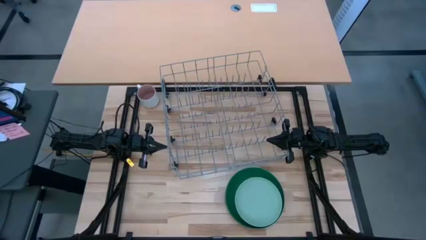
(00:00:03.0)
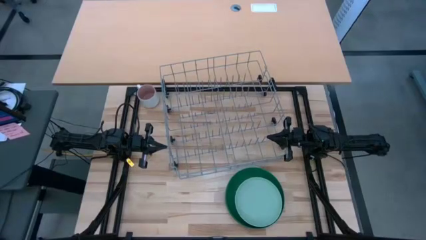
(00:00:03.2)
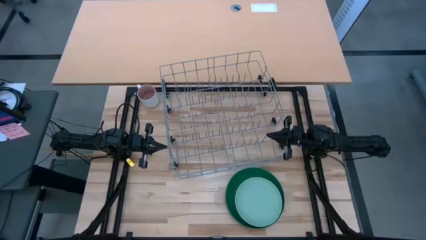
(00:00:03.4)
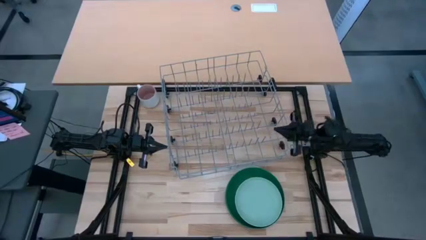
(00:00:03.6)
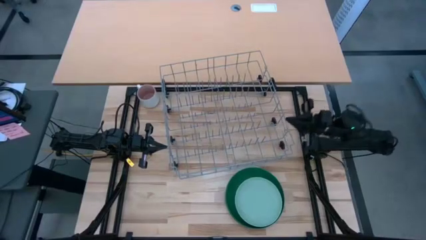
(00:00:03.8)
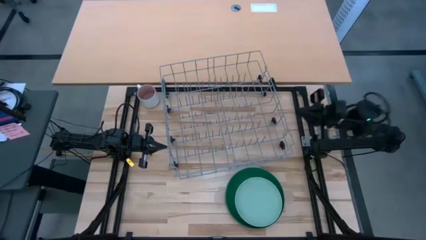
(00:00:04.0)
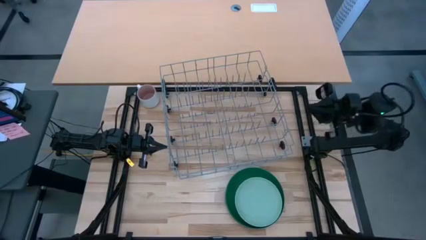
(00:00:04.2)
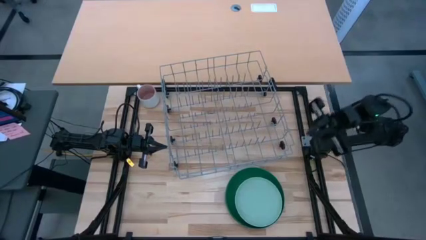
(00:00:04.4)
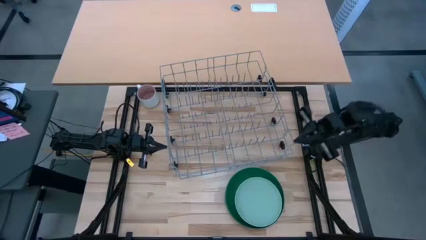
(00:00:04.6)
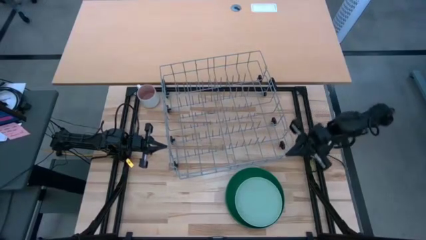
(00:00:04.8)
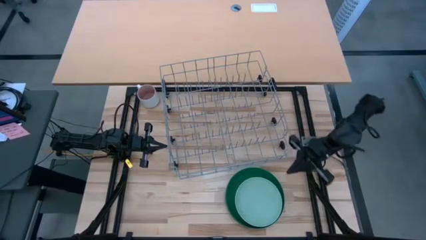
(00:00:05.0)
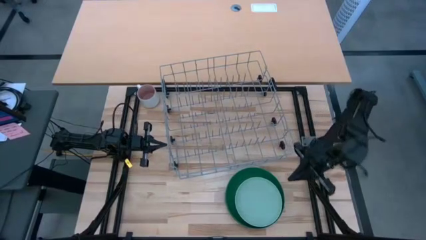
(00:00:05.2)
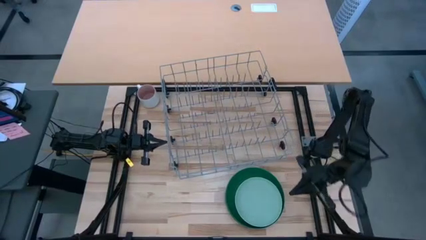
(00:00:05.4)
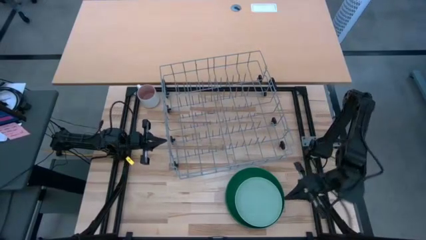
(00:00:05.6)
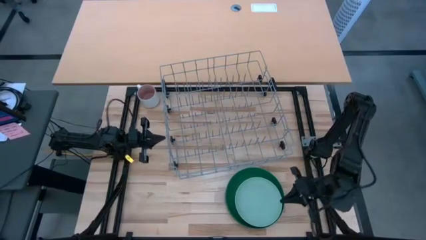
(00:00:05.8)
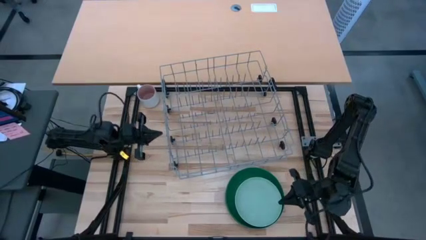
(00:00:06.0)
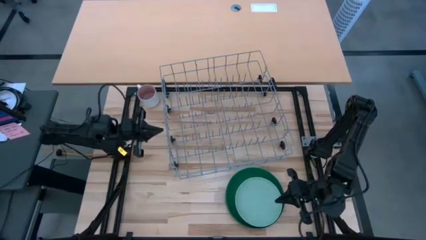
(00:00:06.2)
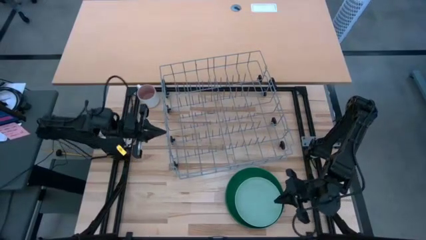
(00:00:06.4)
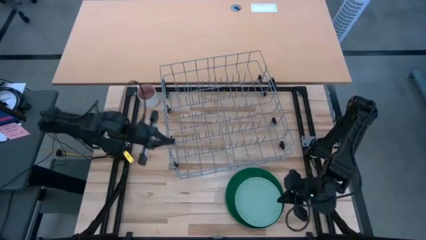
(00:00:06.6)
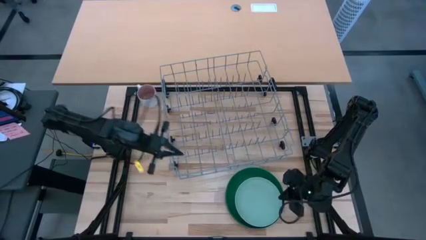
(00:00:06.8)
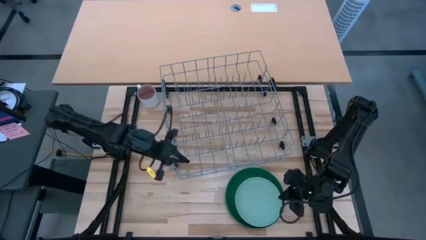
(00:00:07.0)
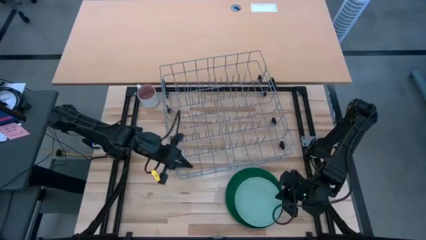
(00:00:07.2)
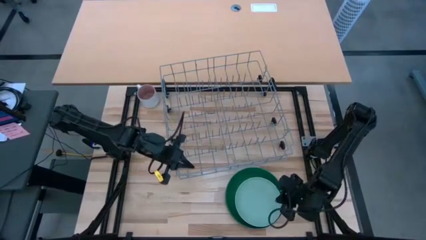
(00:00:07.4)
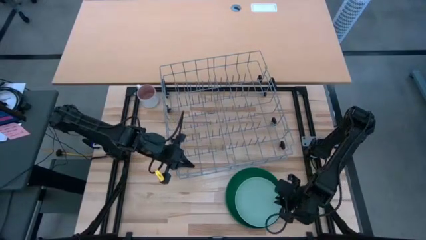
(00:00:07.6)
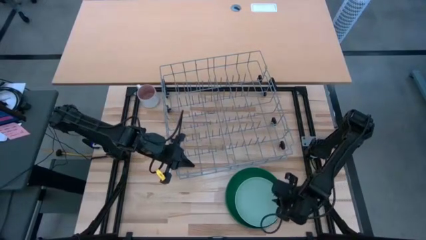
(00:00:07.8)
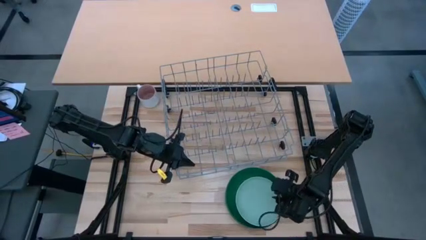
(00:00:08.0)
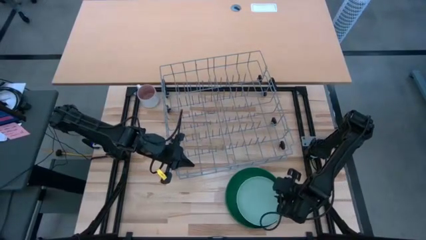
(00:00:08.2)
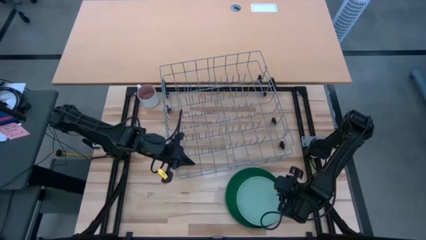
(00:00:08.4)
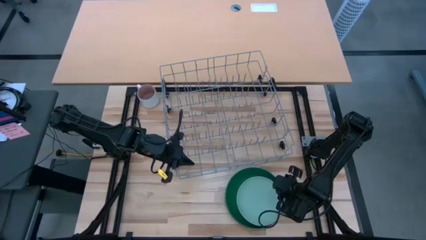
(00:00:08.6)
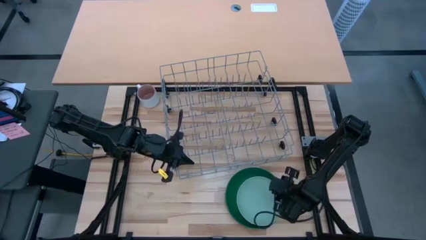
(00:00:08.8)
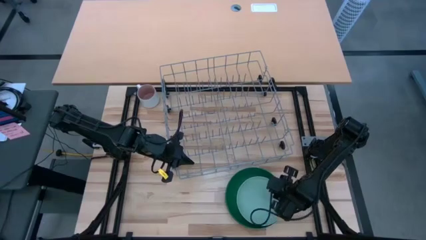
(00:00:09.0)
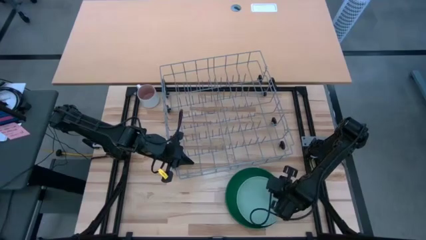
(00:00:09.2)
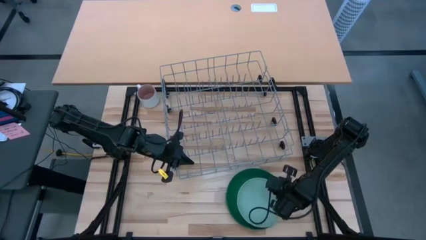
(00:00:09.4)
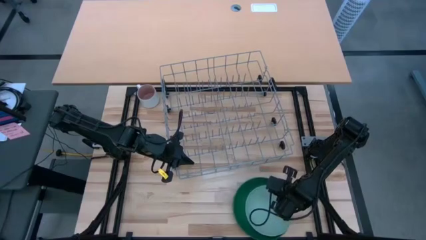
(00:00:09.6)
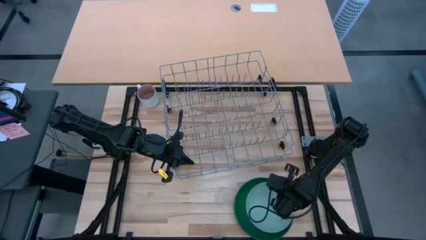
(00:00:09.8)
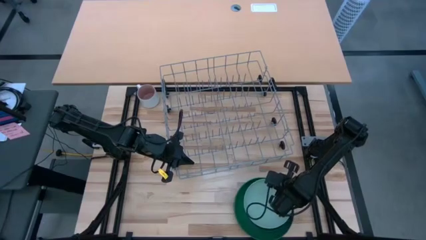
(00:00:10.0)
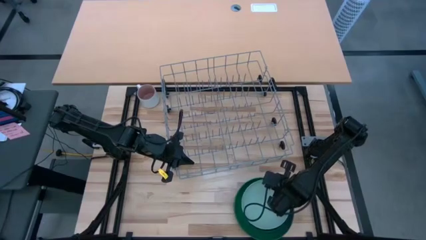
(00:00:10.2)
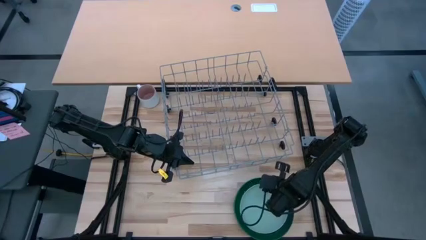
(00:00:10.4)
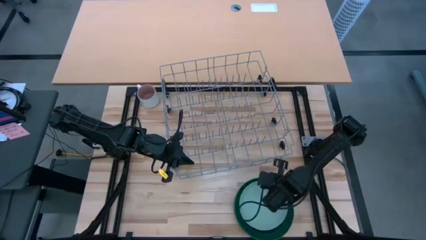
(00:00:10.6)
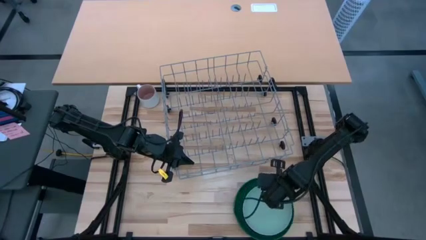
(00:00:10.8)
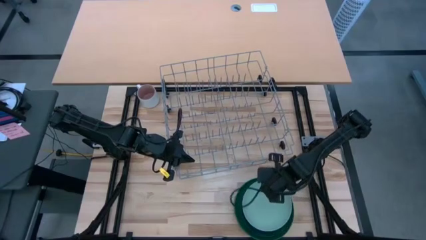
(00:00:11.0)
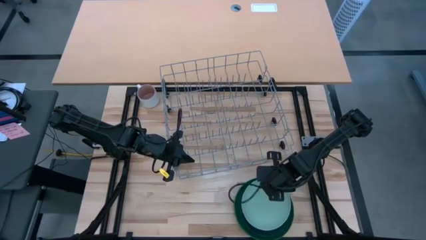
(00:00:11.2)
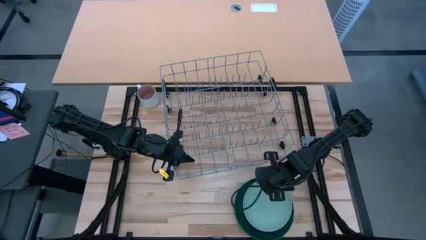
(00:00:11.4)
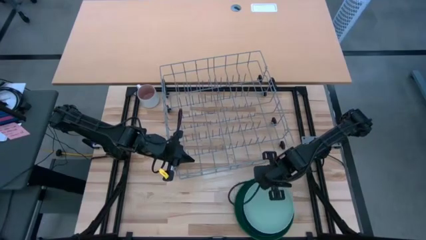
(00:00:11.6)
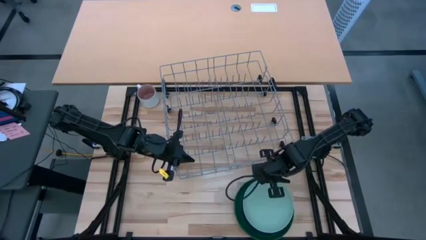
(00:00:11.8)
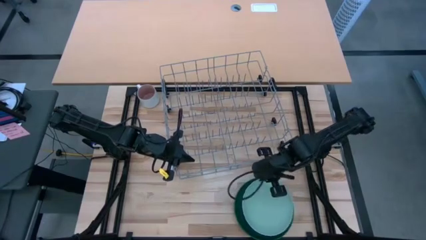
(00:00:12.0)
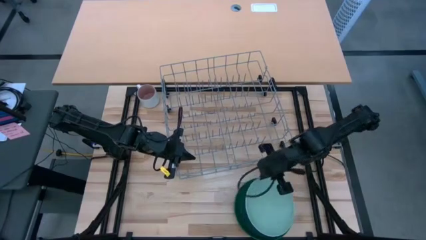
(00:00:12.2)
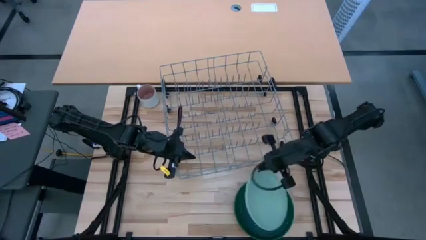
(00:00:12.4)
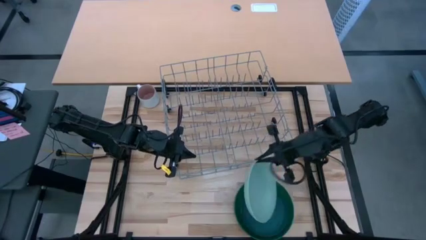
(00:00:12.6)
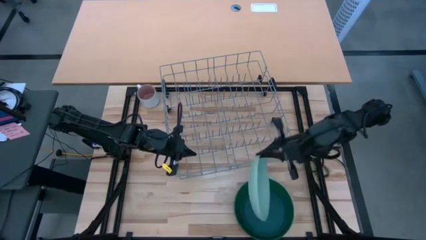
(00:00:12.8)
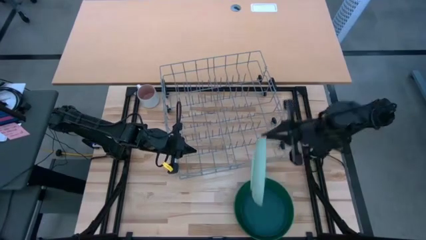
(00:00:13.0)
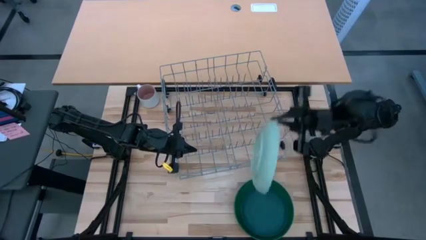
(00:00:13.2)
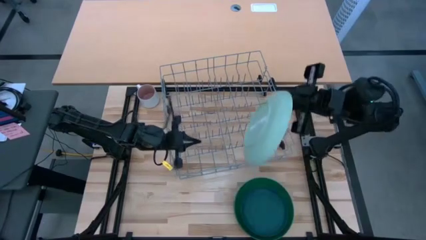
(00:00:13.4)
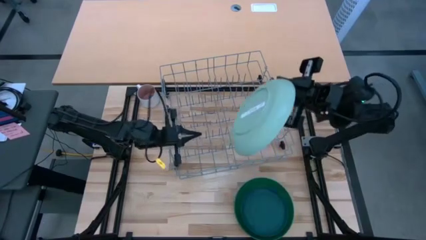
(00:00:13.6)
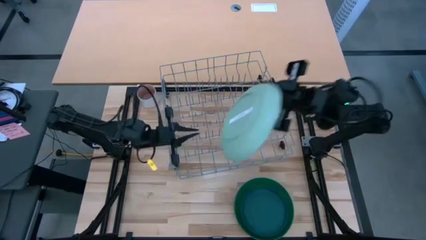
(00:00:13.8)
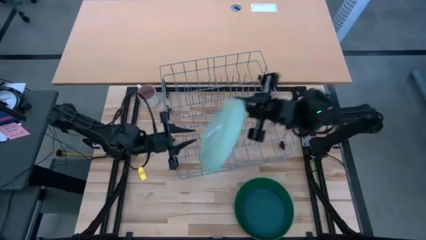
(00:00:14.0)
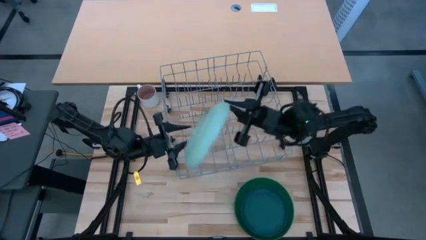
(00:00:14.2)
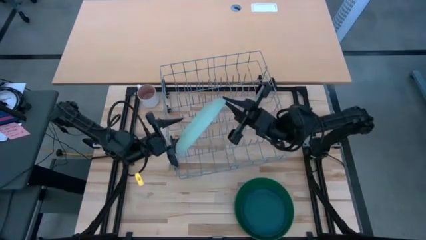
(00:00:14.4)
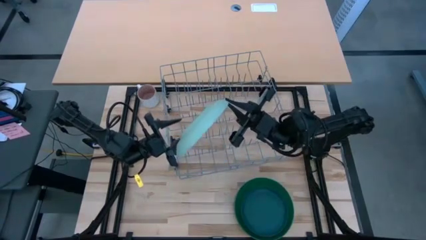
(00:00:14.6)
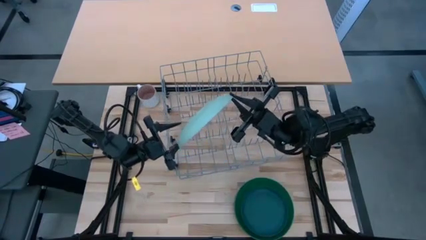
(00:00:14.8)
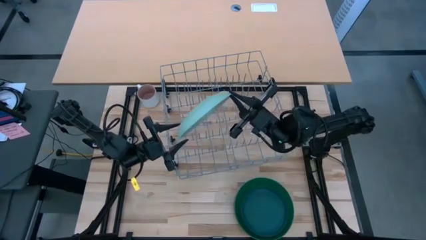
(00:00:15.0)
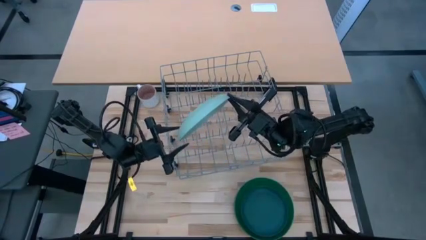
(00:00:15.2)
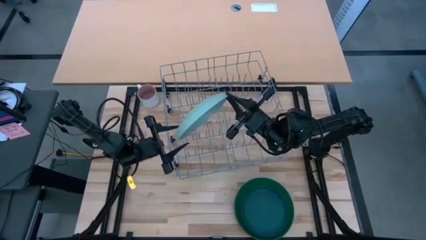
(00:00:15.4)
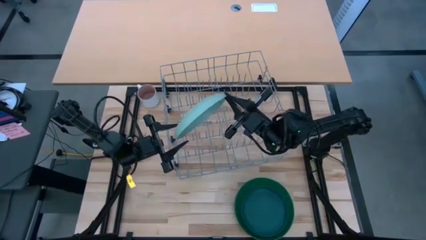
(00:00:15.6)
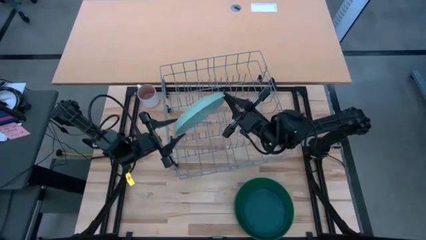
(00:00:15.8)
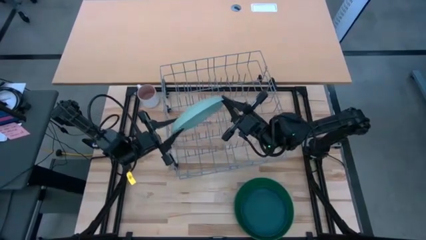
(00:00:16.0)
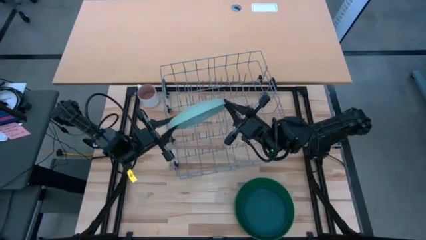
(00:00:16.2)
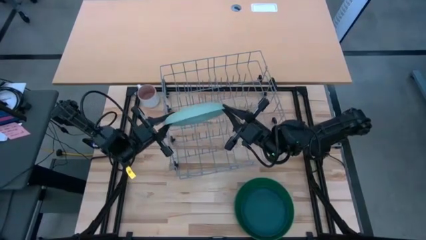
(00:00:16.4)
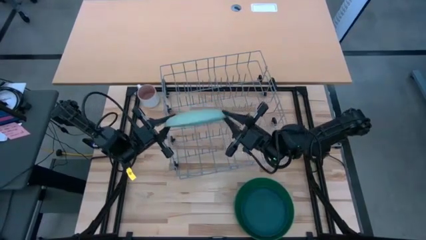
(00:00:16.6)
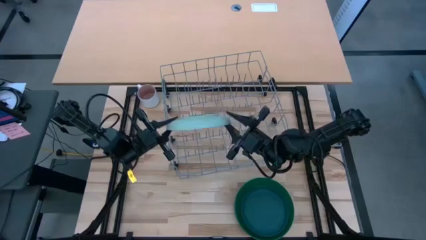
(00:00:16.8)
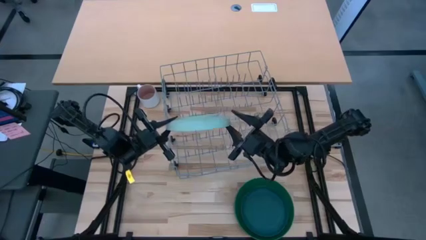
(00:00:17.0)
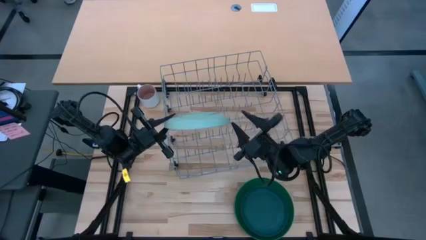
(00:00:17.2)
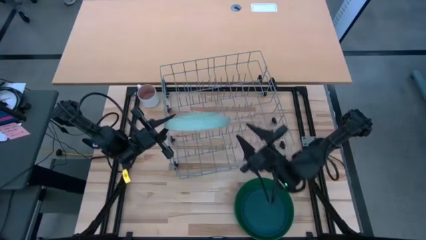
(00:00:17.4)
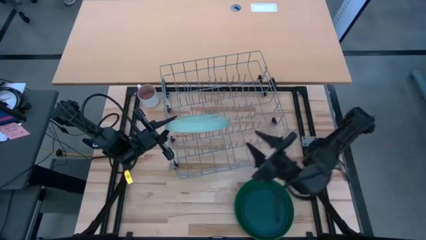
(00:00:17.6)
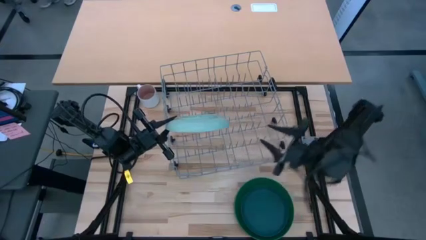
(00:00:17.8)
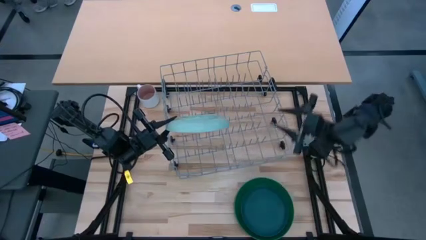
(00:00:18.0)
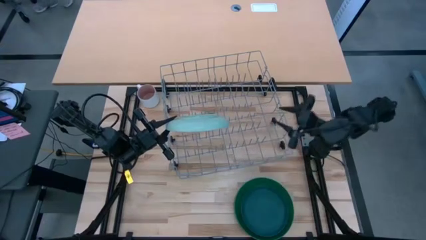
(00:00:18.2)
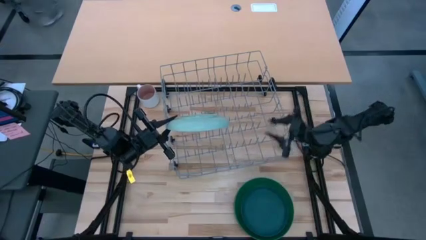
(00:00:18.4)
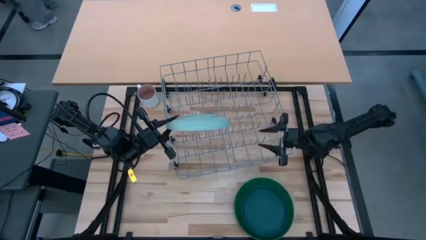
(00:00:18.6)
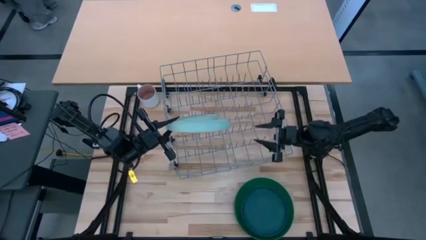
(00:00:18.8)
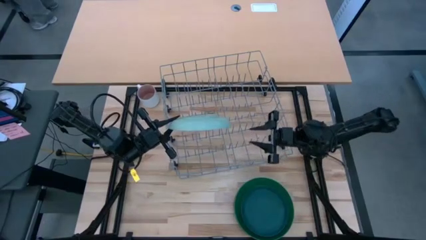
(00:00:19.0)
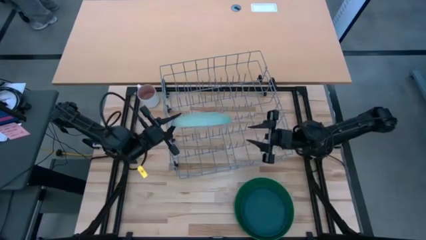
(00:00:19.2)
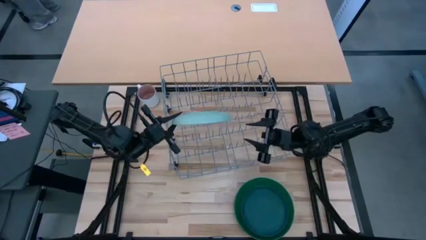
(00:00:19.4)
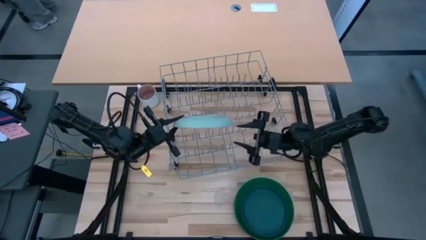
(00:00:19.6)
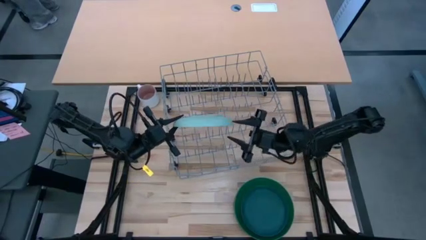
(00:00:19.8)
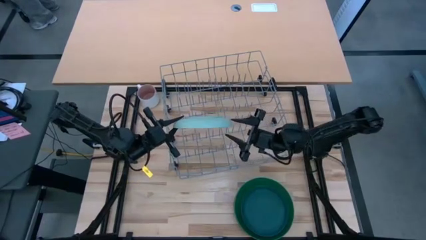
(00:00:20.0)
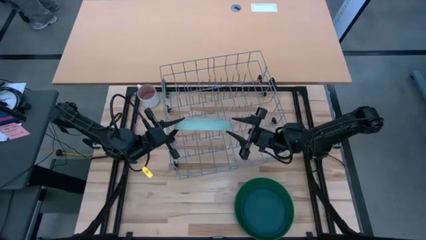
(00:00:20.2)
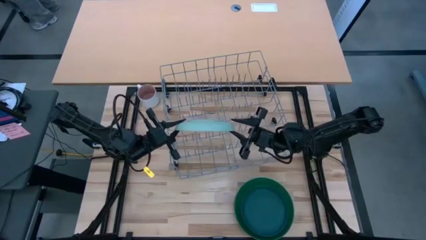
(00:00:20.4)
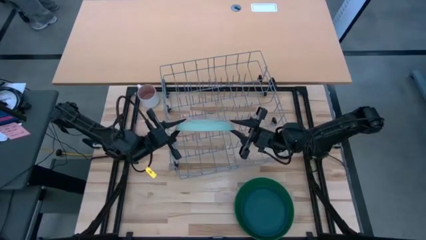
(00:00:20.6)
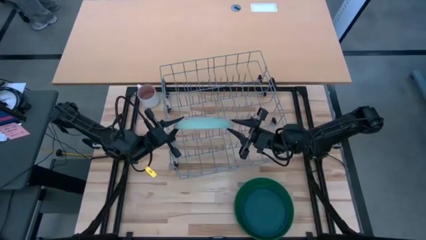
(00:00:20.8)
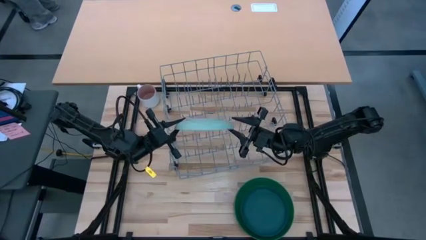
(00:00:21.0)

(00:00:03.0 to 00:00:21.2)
Task: Sort dishes
Put the light green plate in the dish rack
